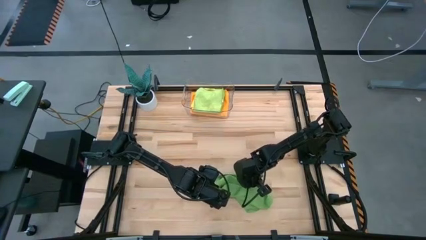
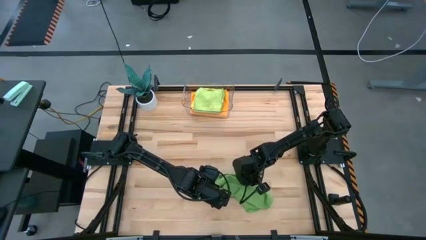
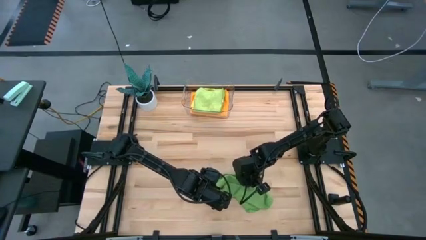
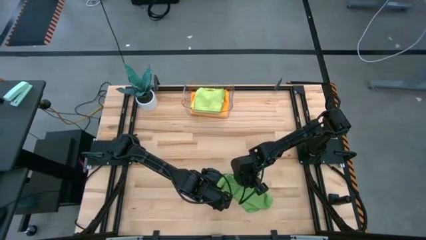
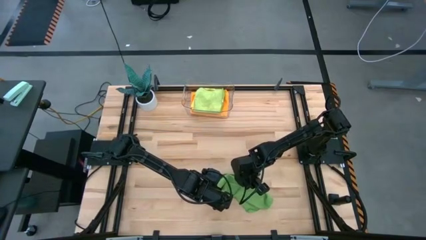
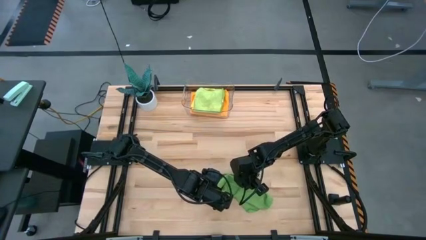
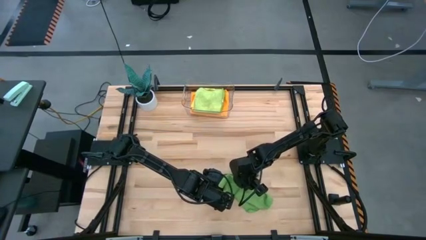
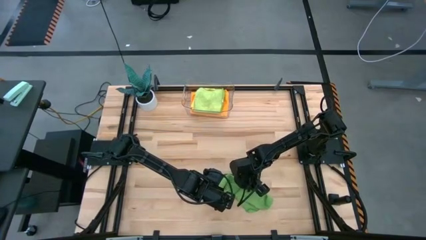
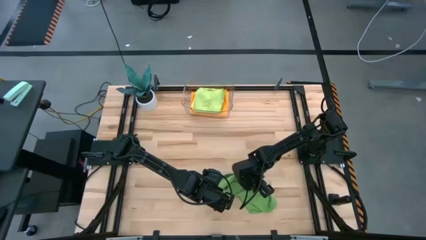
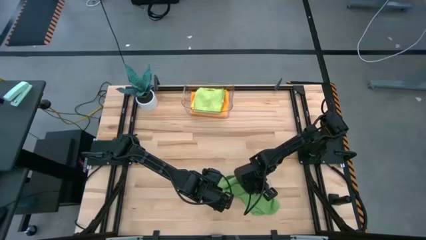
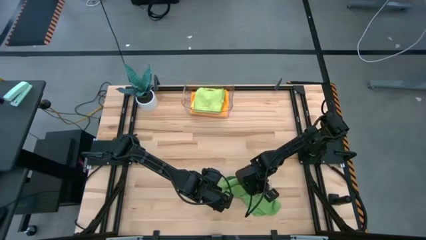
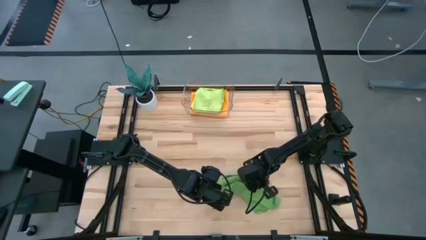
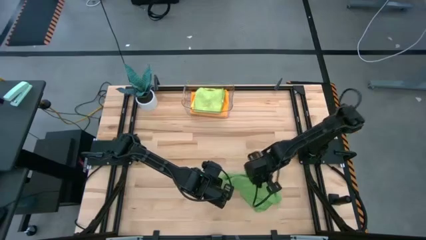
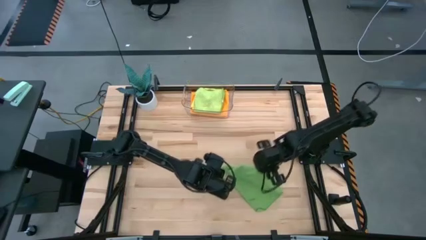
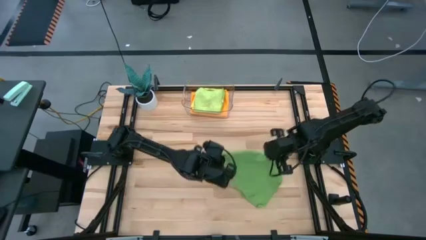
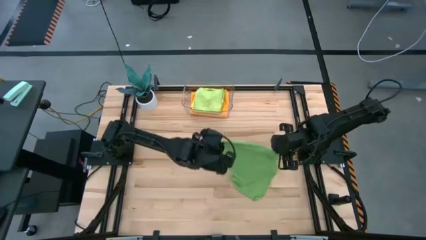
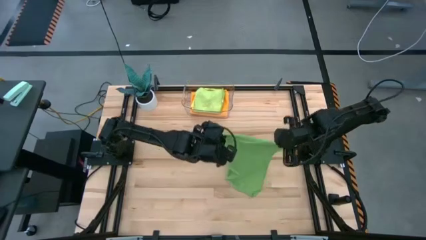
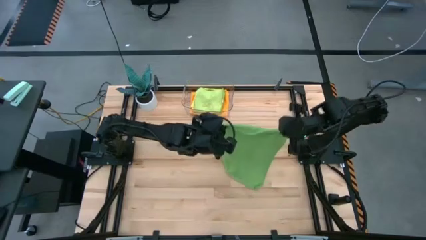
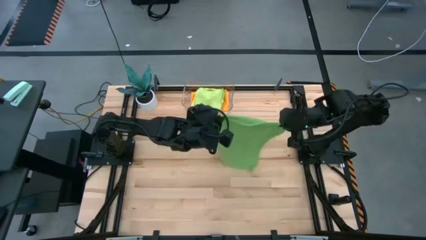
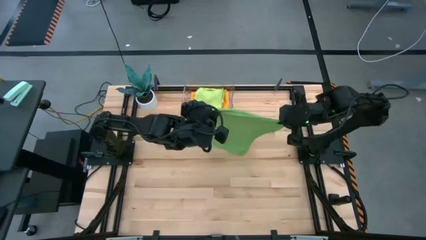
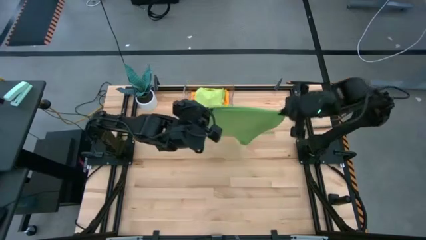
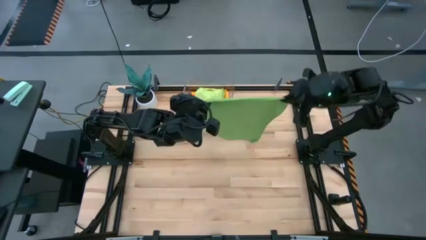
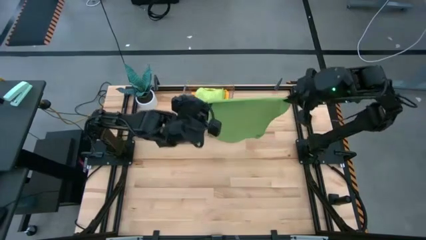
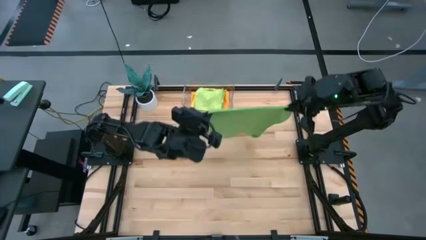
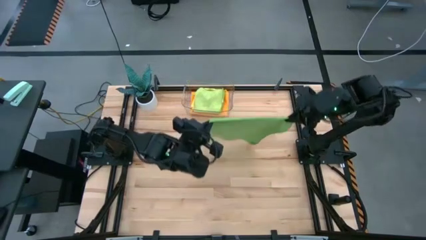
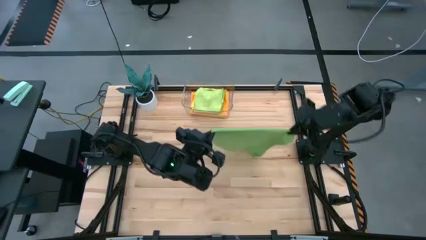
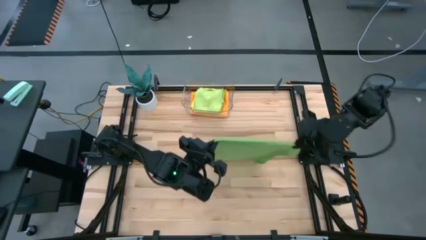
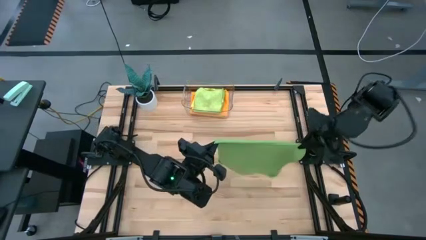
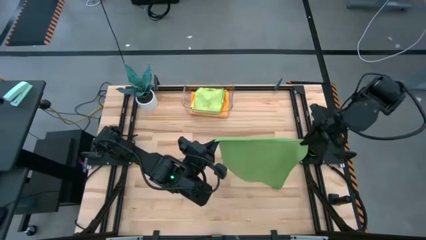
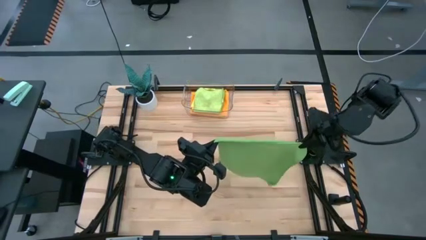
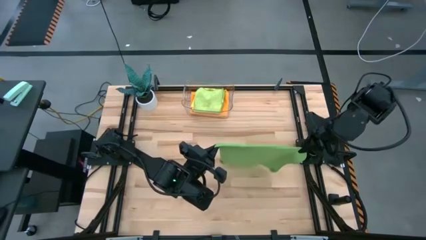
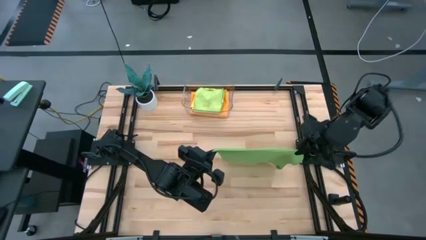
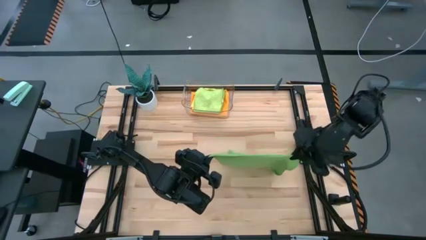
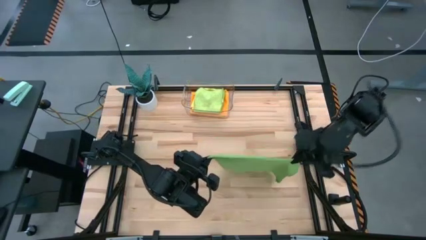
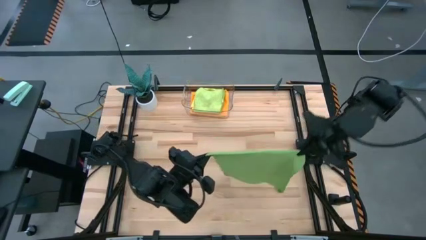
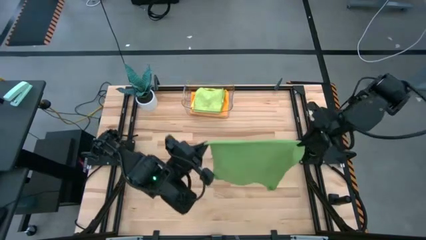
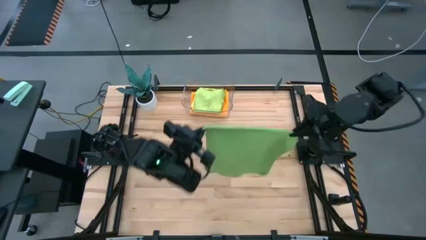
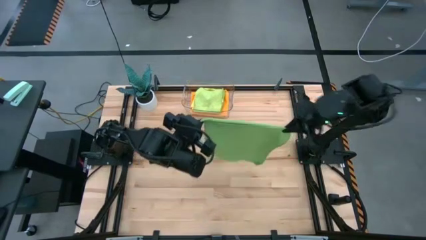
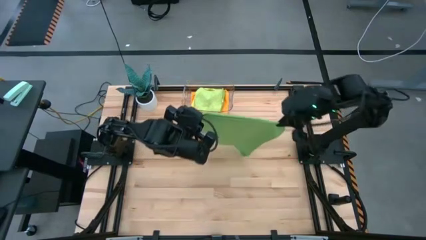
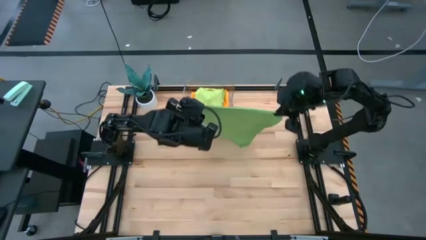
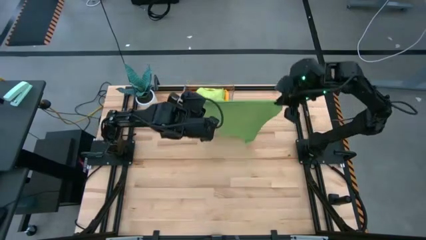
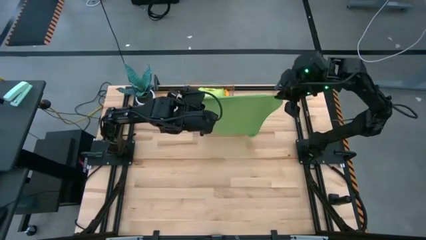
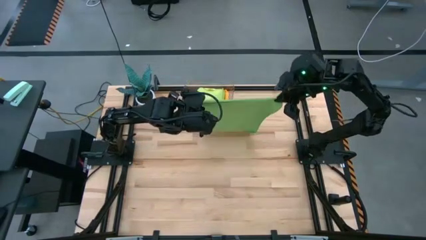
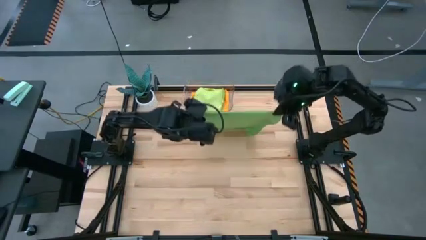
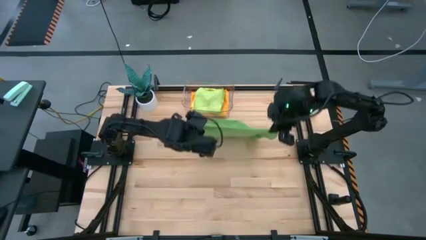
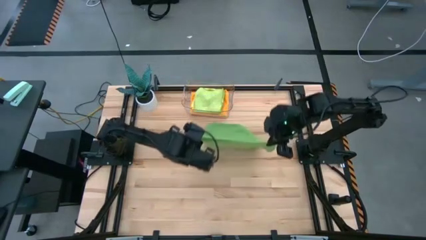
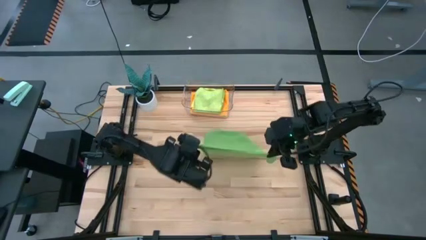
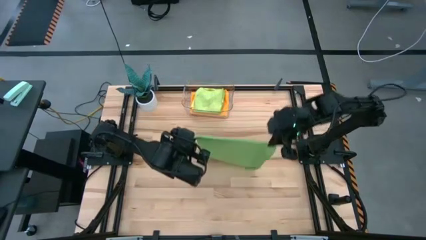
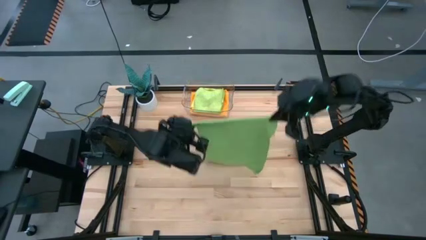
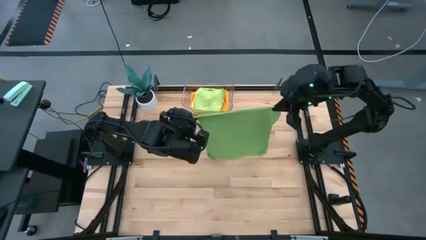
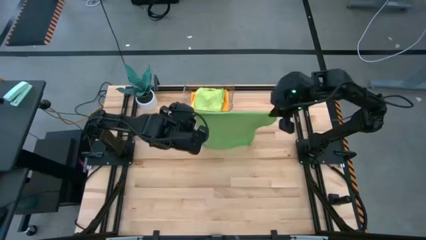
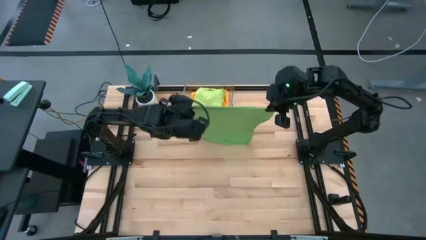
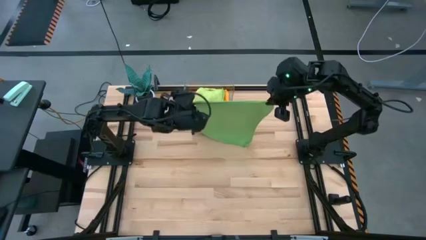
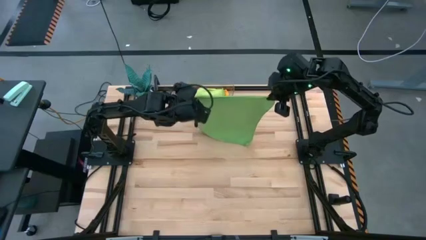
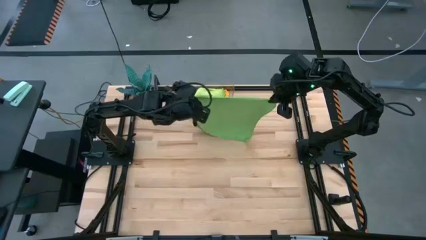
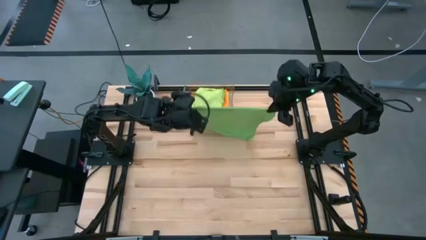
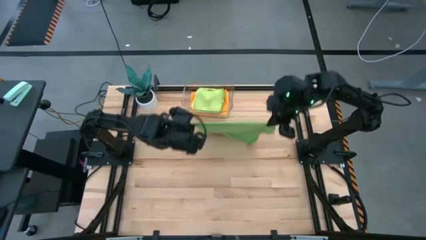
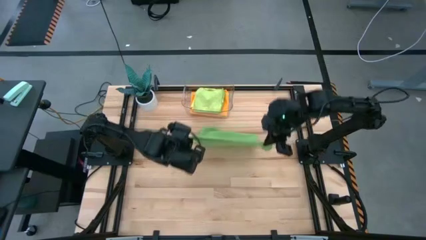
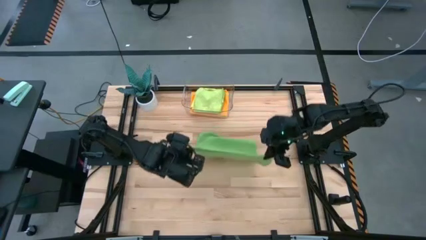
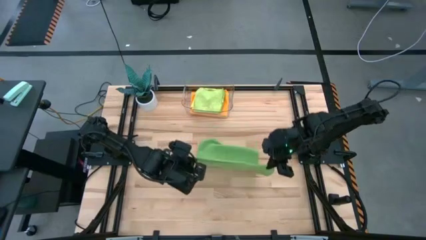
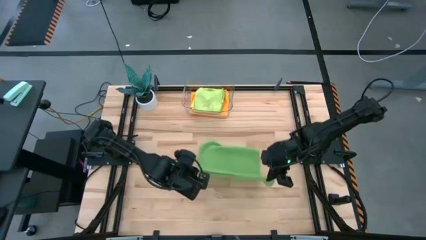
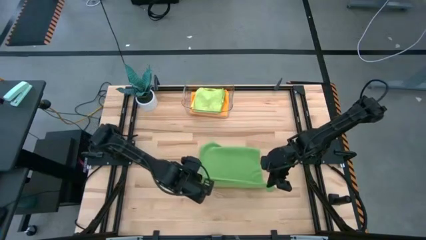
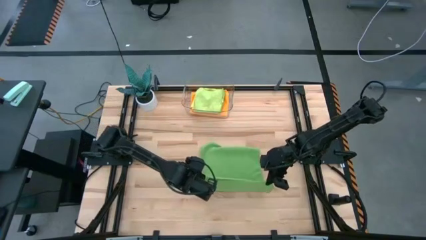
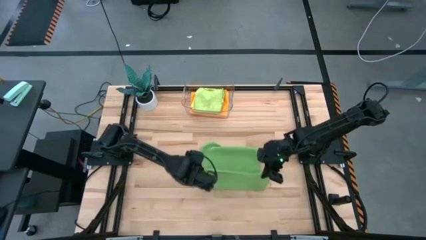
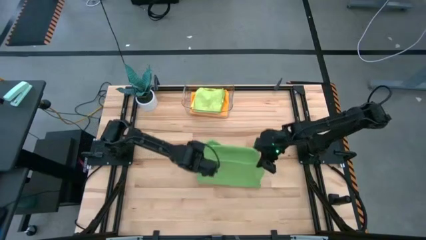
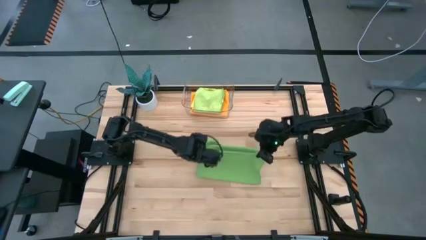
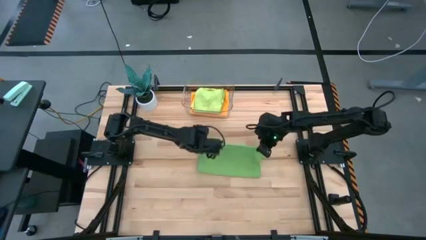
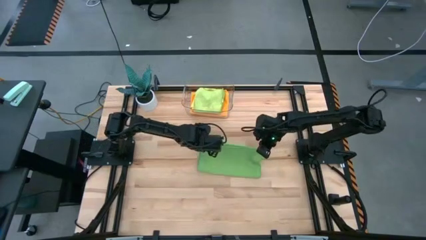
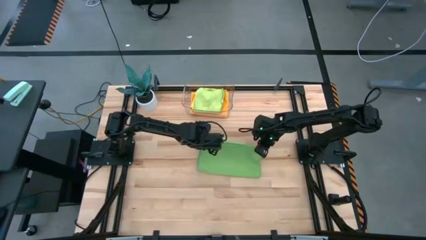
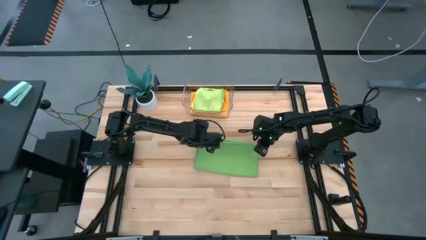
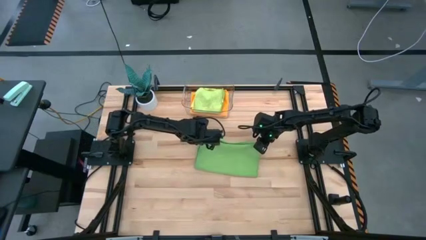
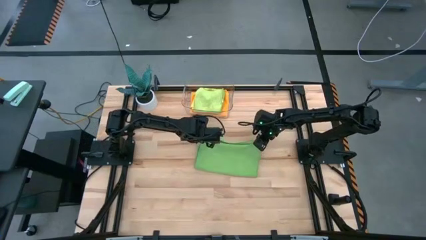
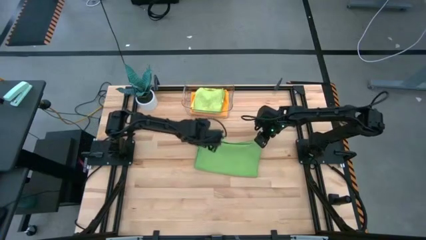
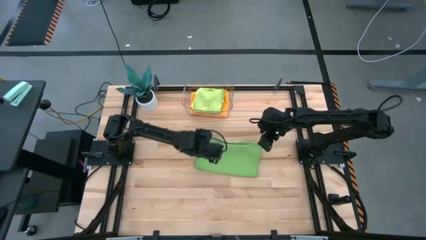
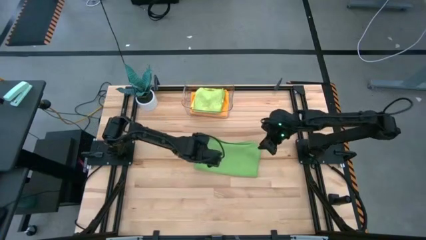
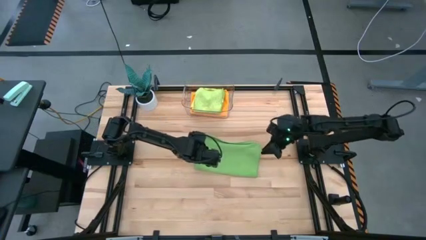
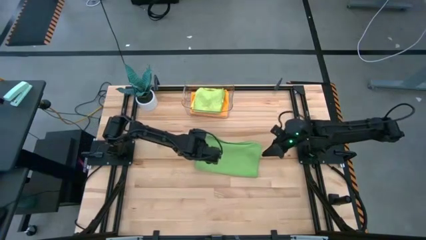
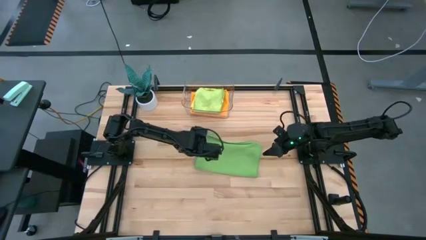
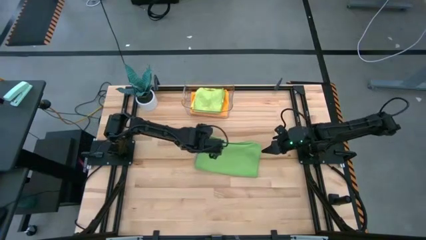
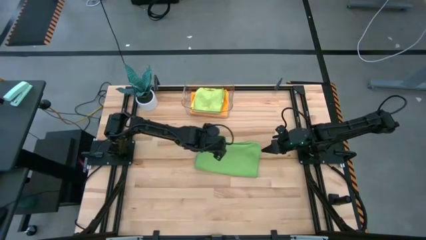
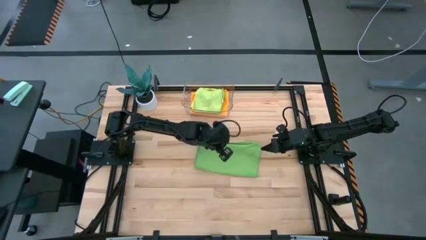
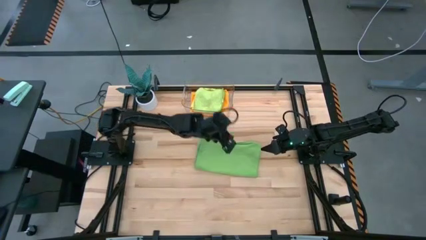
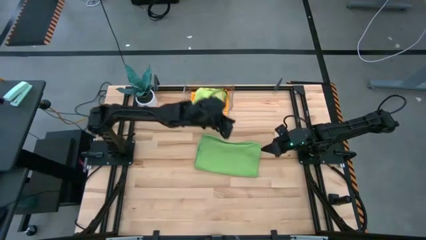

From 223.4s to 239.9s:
Task: Fold microfiber towels
Fold the green towel
